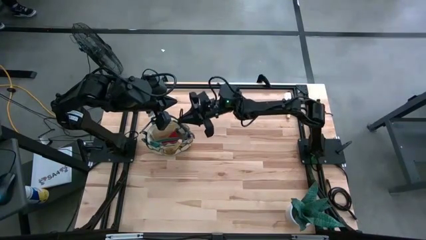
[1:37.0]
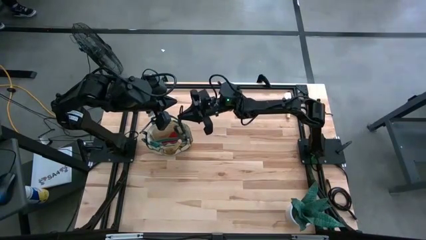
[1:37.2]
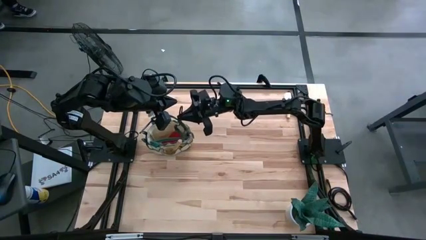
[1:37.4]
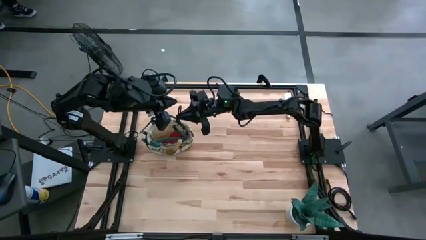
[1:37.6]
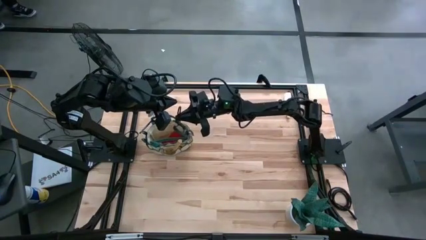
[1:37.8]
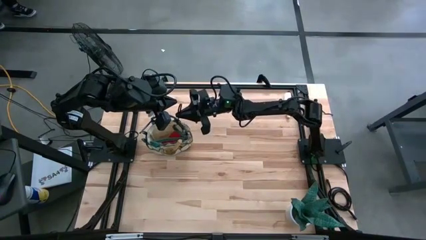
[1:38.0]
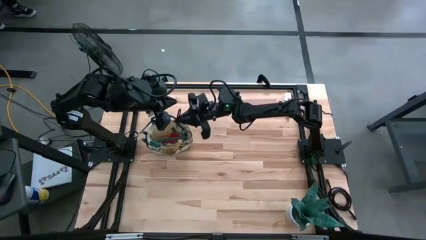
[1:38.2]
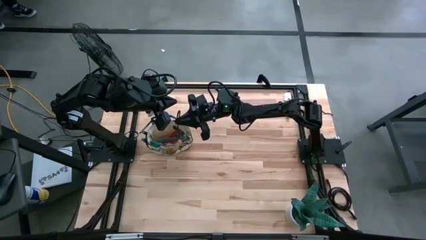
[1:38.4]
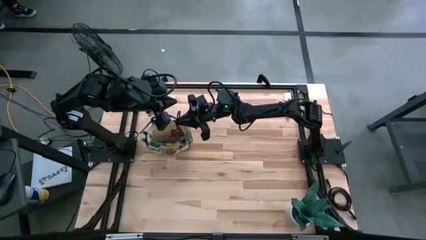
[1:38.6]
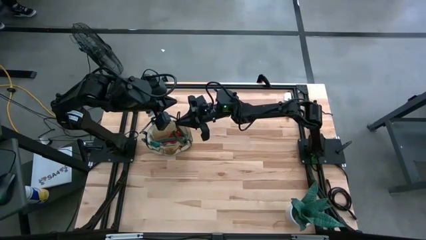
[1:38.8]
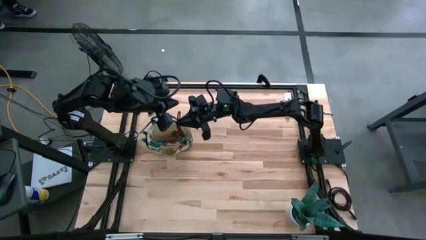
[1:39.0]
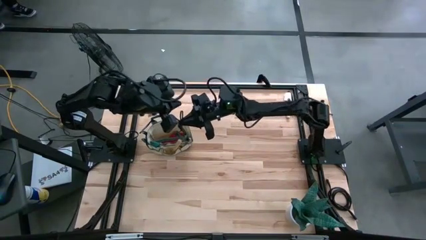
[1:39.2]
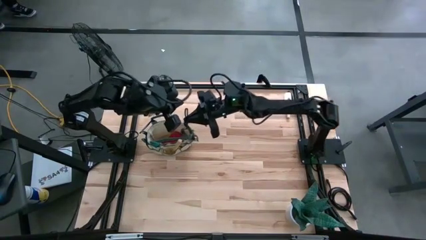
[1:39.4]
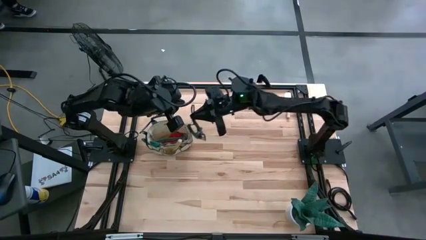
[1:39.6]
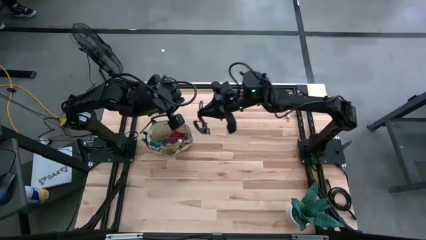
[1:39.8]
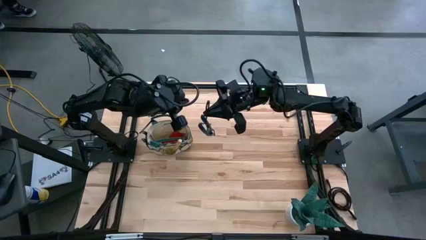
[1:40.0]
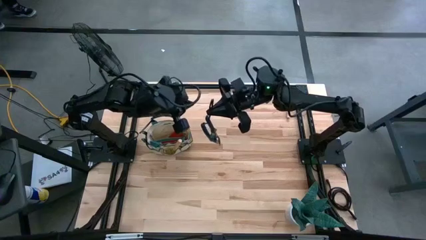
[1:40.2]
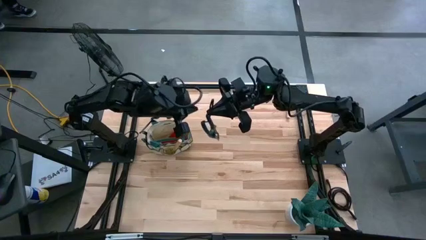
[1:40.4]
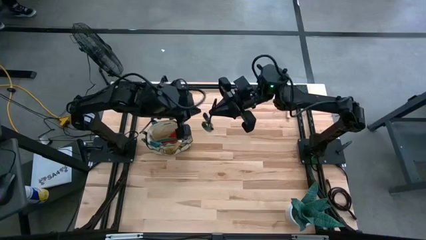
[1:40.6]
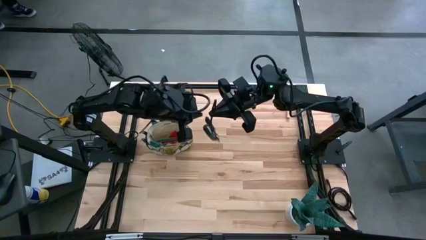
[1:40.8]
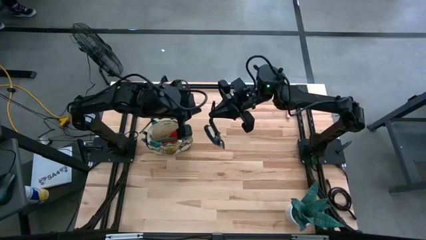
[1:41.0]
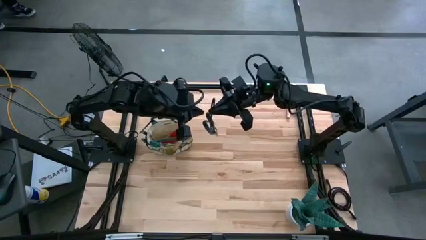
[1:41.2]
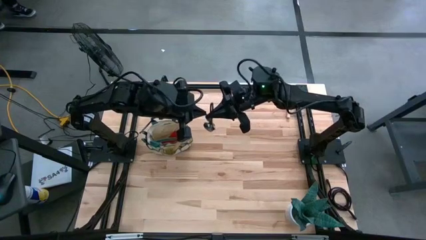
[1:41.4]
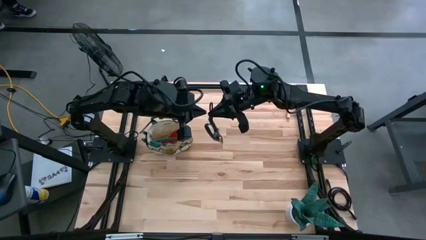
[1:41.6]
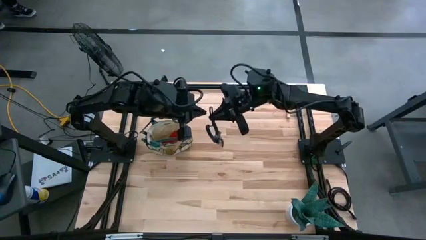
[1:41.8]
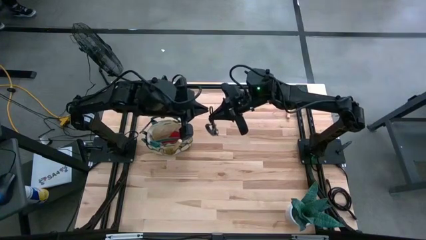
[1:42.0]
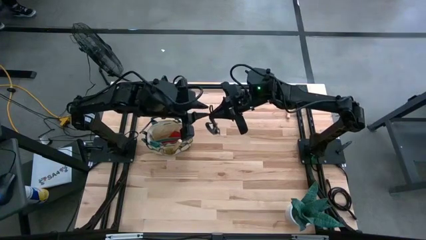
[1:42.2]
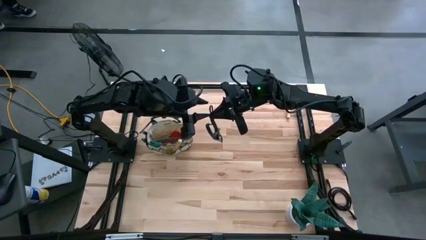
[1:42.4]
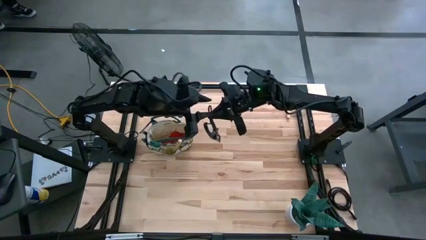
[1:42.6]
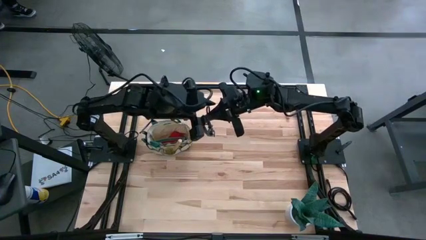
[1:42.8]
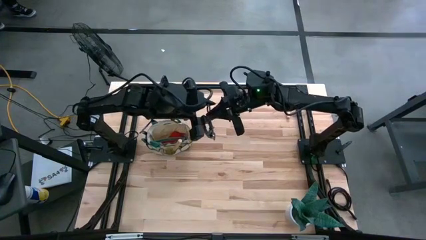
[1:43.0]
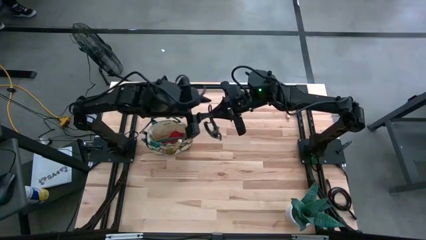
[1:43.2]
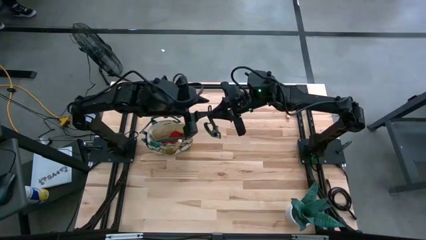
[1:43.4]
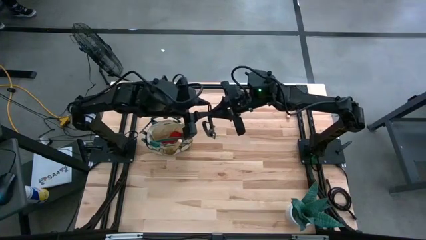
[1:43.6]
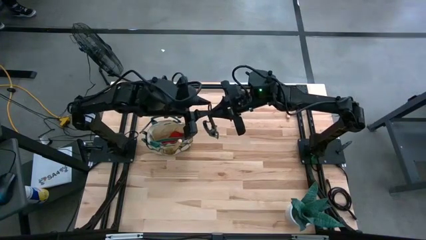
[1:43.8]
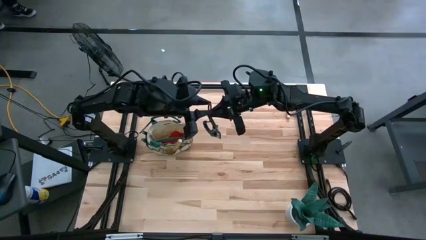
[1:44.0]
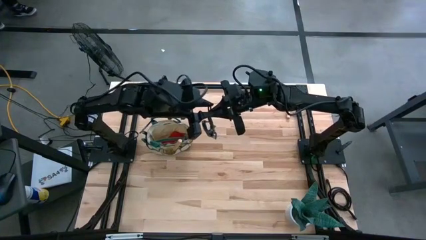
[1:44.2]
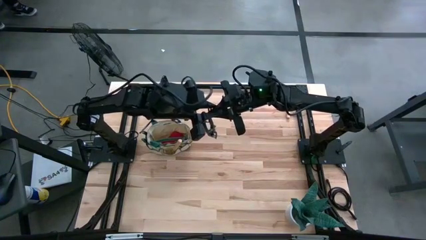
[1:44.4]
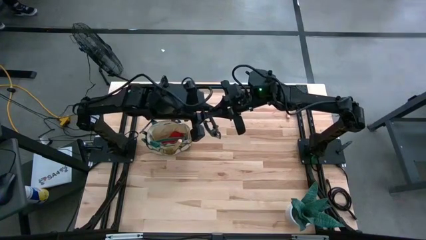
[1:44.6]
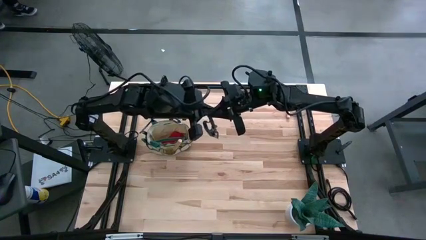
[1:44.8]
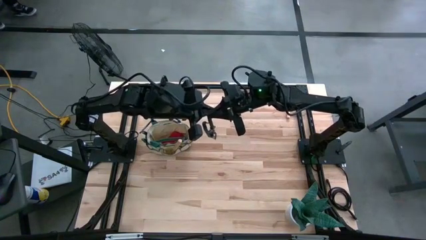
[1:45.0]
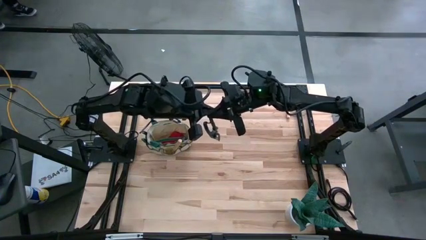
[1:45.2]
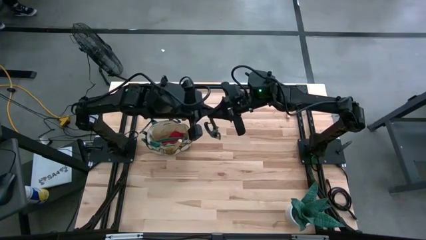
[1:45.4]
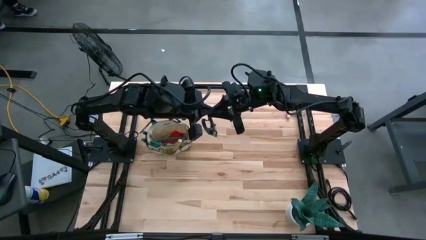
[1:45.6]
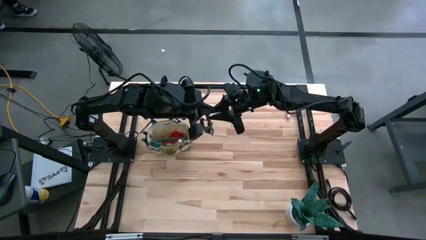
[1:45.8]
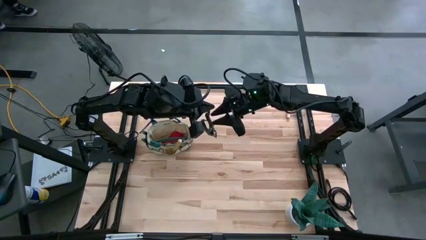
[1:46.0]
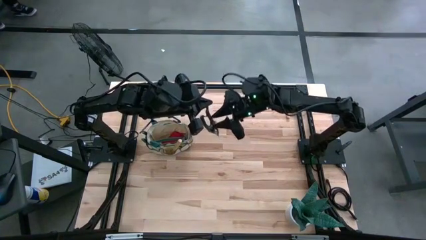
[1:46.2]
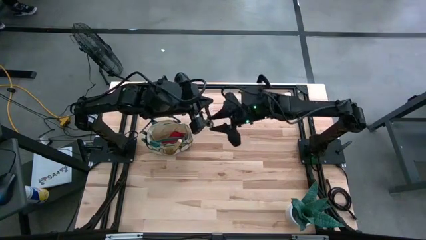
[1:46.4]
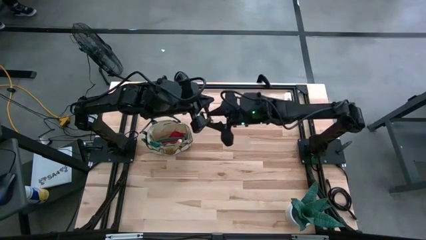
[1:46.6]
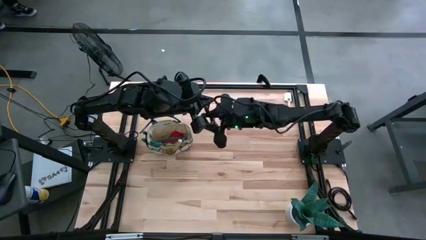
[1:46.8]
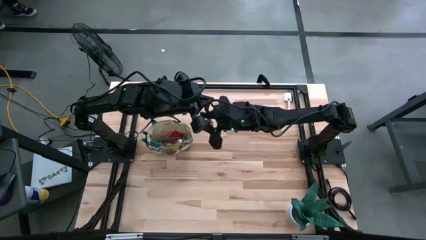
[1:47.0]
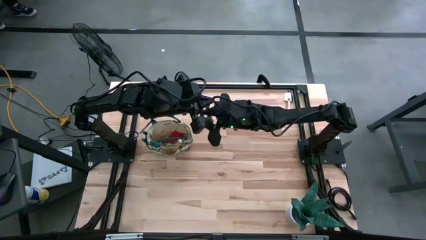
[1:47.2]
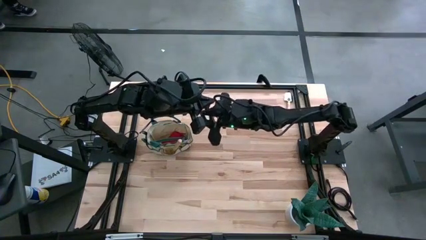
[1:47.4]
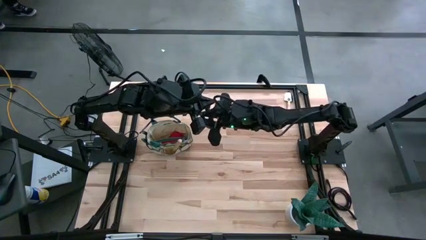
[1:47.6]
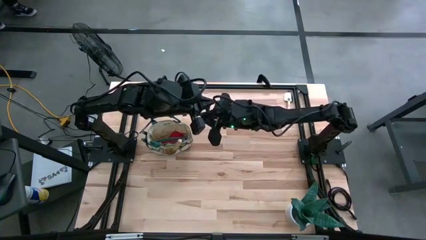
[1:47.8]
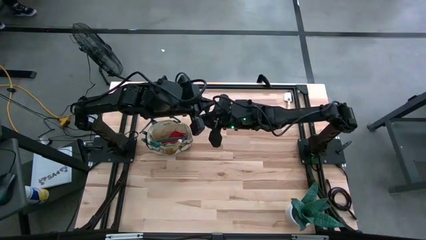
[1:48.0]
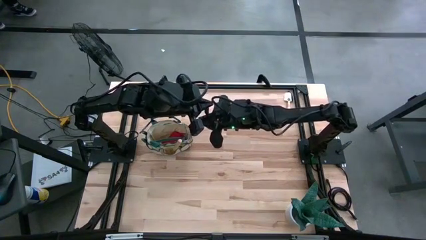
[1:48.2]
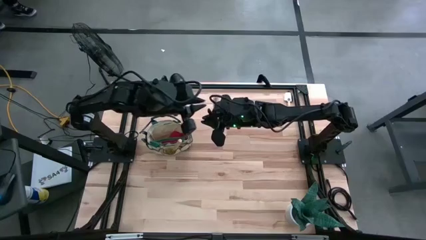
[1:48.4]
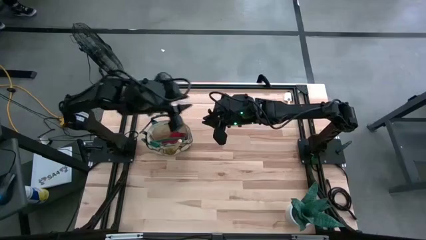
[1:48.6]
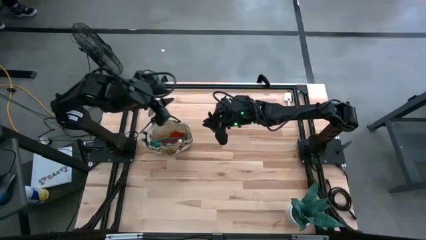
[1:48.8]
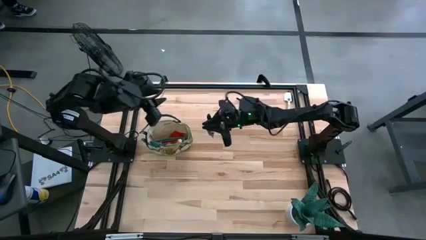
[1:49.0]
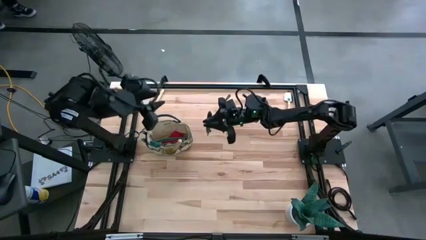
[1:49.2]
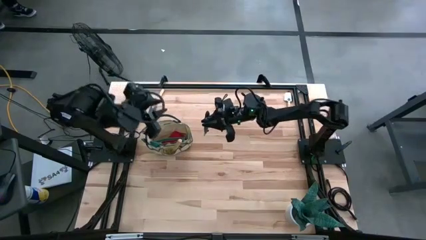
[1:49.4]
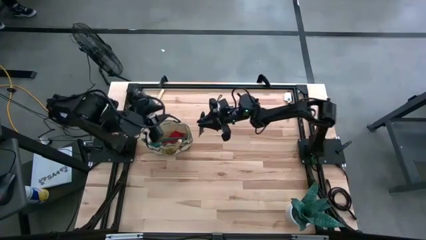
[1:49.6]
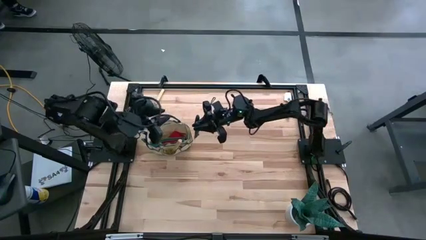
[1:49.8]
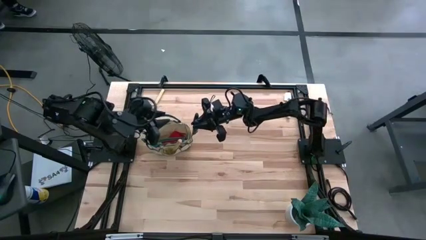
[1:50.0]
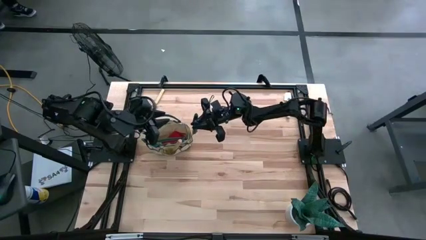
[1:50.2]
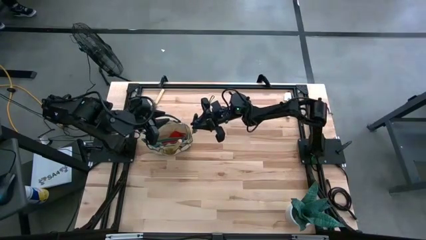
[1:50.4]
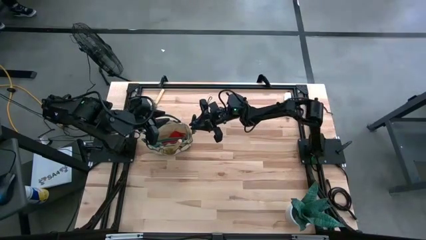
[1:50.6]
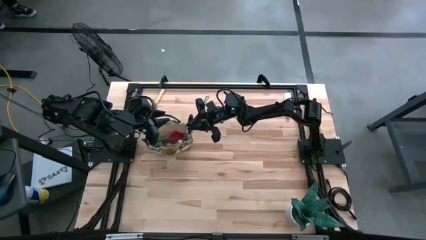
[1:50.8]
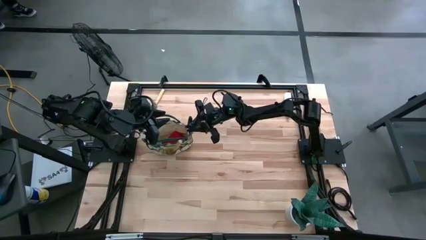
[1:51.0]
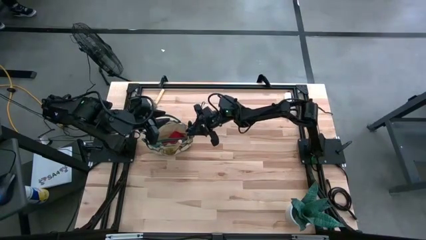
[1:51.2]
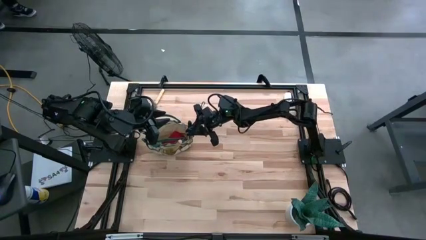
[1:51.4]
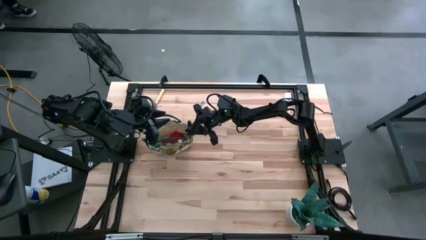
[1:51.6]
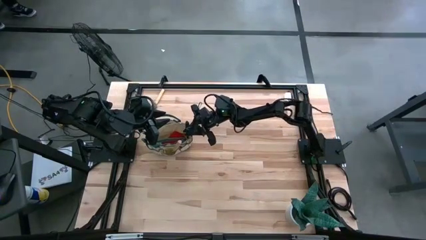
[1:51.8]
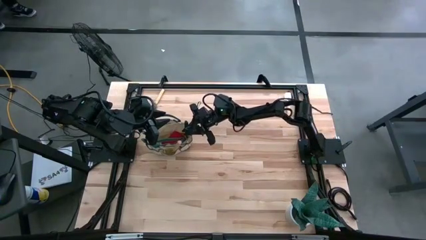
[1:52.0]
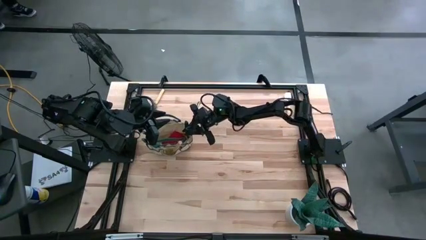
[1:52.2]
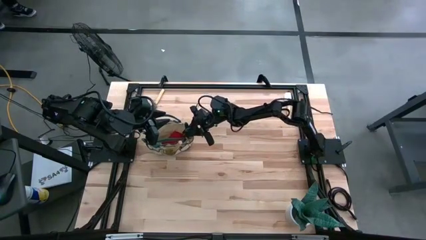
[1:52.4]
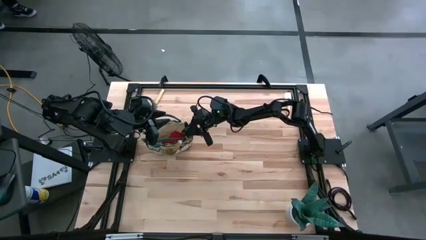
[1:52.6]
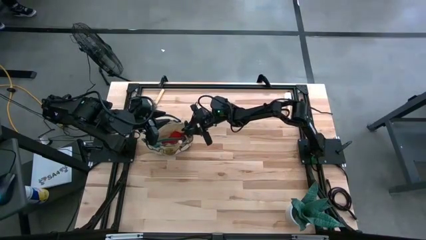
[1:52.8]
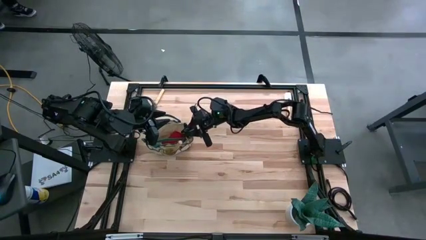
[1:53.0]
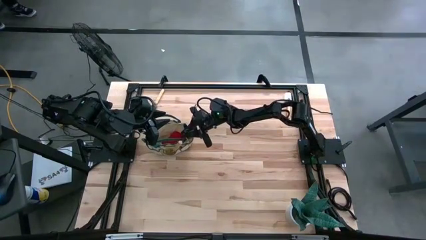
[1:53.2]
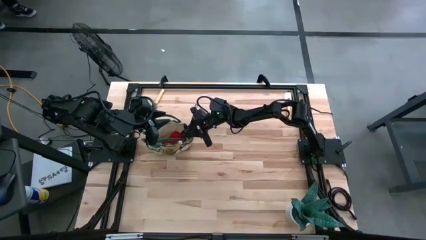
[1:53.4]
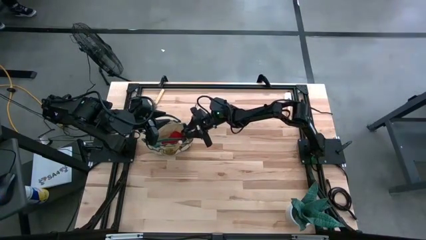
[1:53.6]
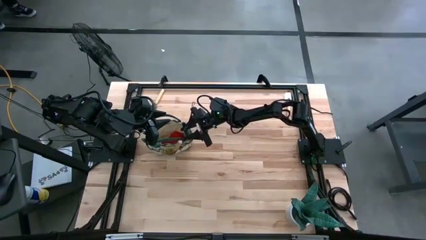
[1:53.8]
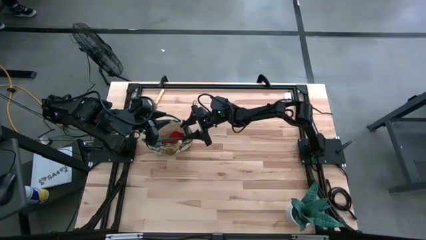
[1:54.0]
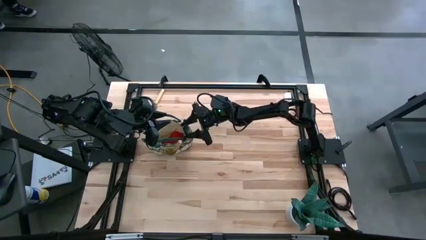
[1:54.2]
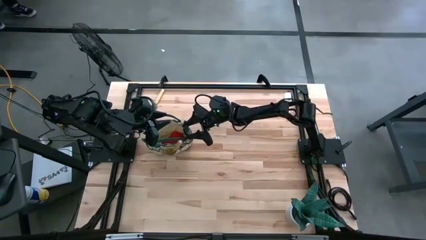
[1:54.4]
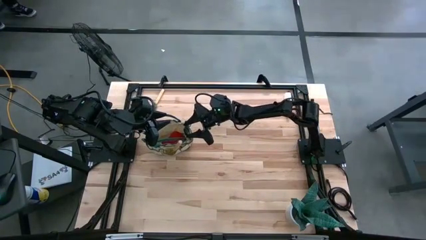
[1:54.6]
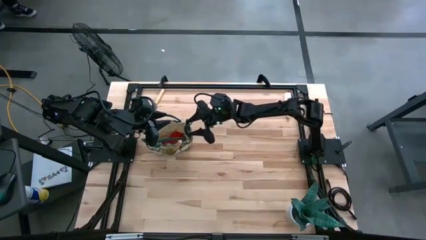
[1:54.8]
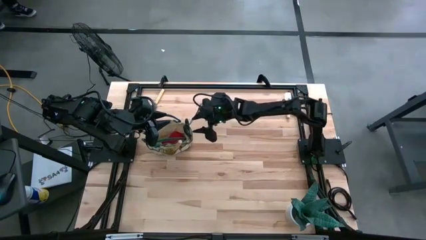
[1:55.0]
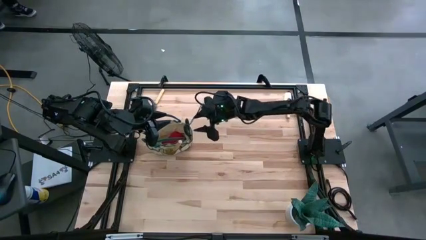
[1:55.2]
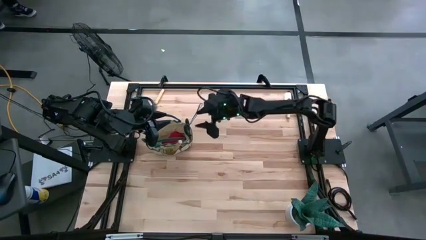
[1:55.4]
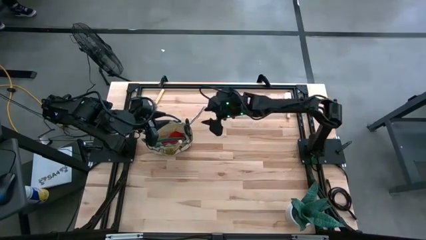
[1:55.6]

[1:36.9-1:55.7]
Task: Pick & Place Garden tools in Gardening bag
Put the green shear scissors into the white gardening bag
